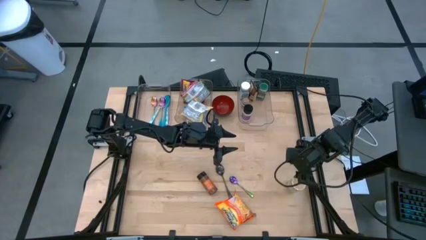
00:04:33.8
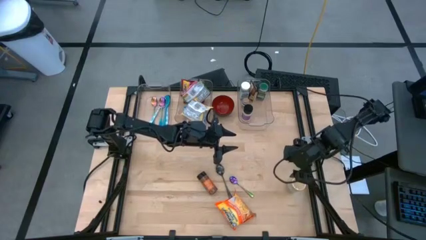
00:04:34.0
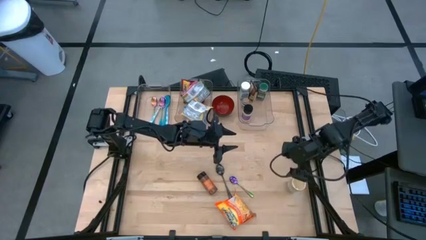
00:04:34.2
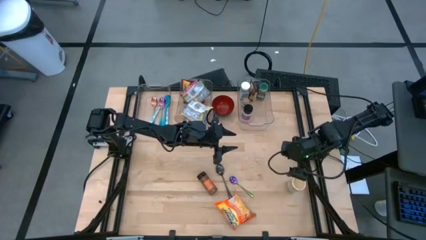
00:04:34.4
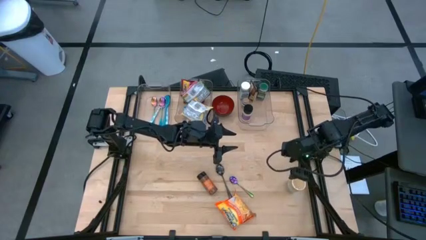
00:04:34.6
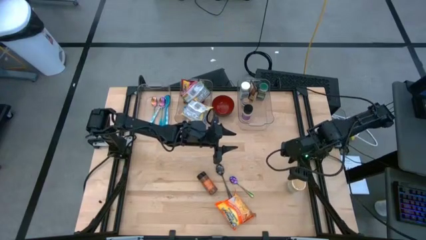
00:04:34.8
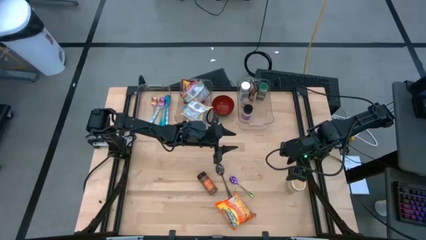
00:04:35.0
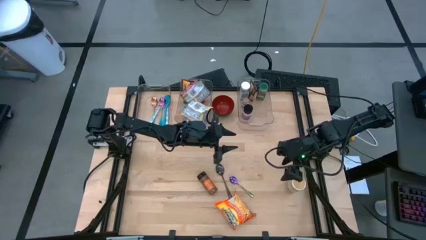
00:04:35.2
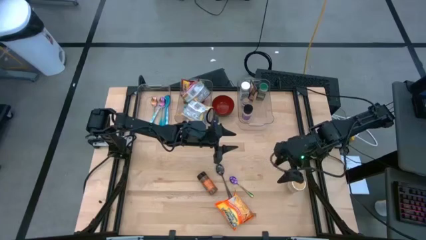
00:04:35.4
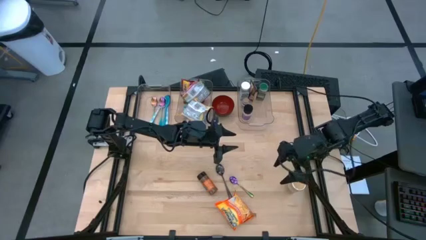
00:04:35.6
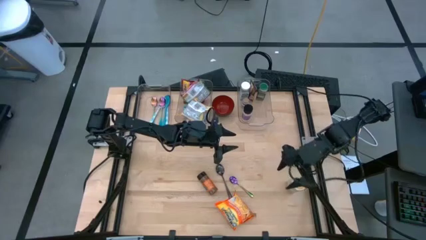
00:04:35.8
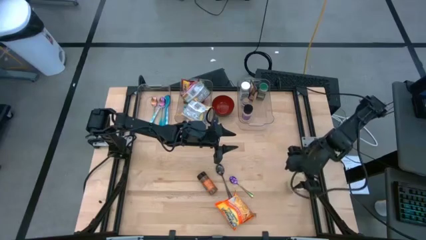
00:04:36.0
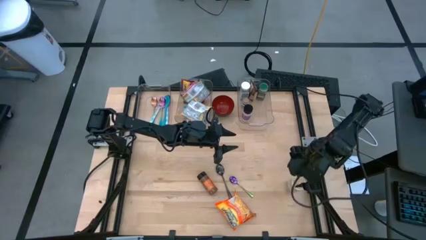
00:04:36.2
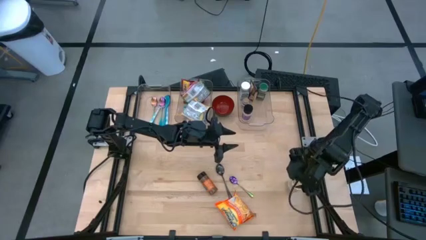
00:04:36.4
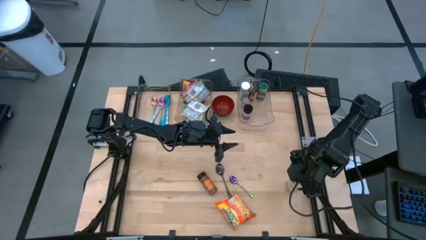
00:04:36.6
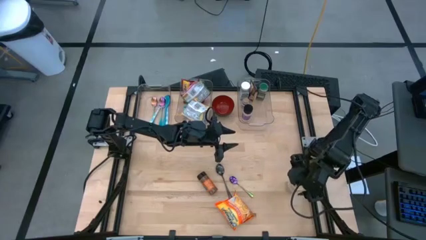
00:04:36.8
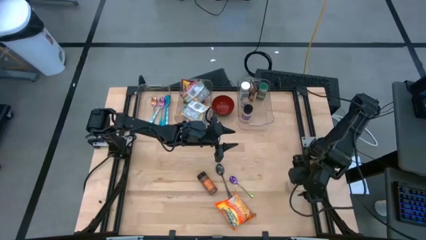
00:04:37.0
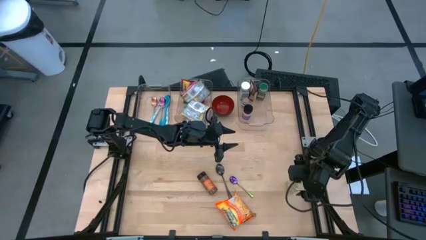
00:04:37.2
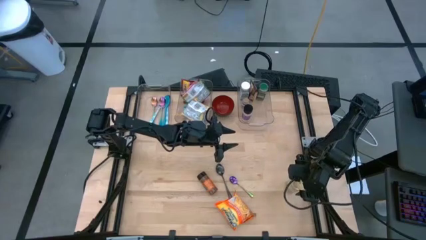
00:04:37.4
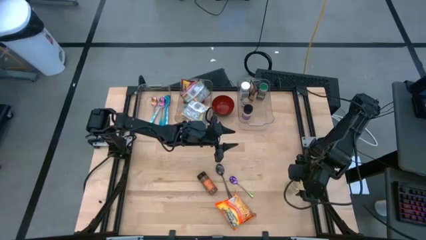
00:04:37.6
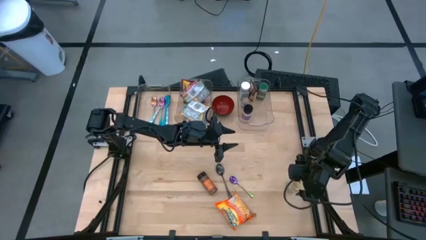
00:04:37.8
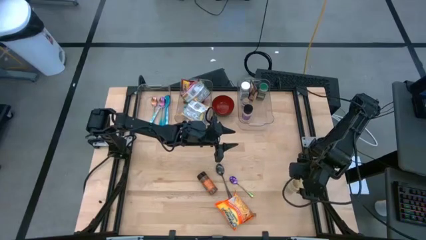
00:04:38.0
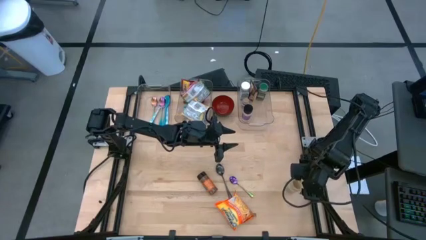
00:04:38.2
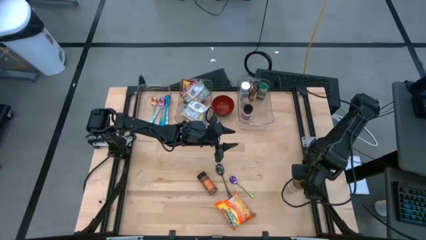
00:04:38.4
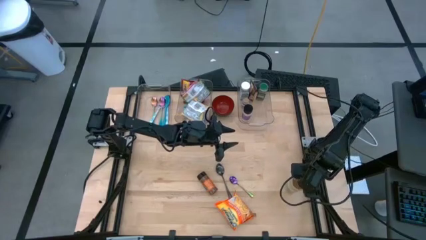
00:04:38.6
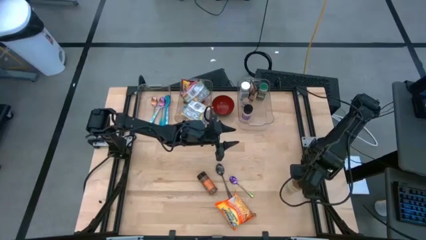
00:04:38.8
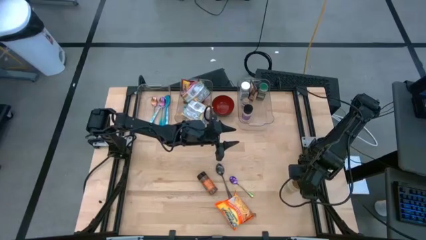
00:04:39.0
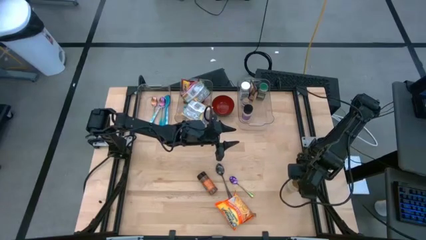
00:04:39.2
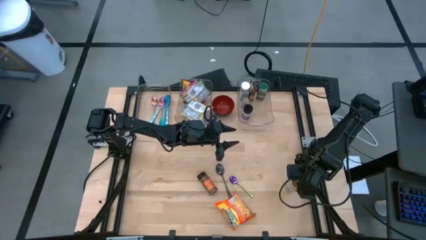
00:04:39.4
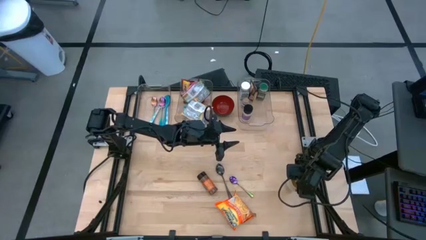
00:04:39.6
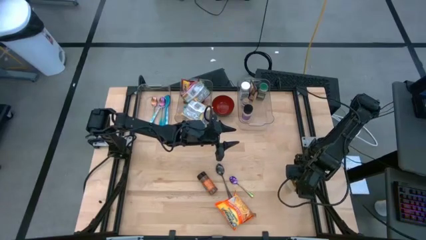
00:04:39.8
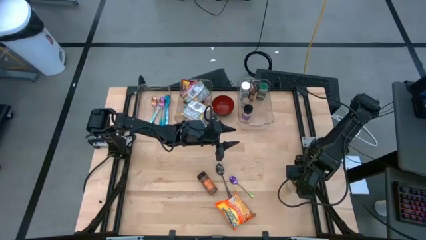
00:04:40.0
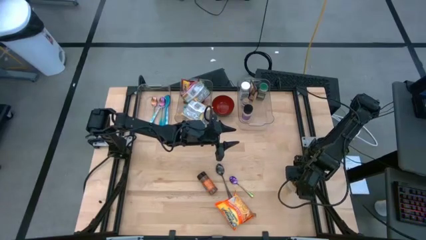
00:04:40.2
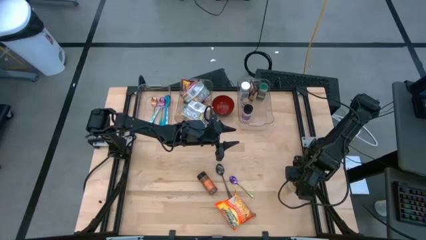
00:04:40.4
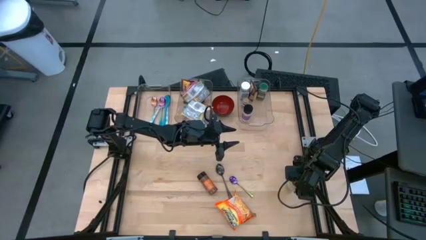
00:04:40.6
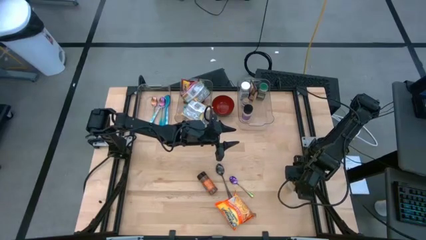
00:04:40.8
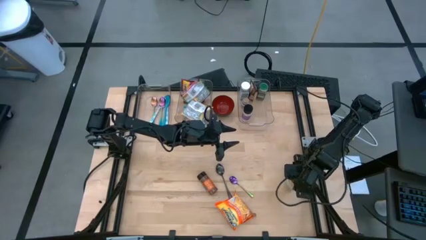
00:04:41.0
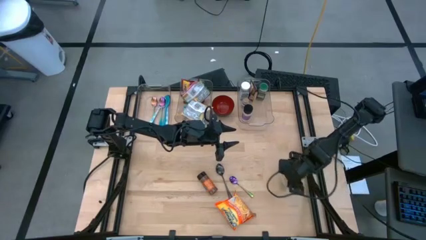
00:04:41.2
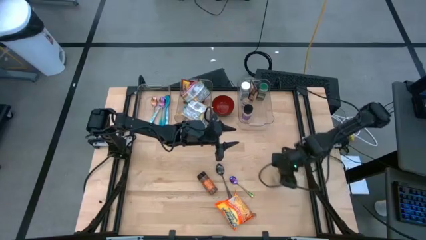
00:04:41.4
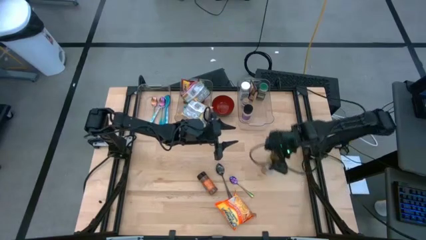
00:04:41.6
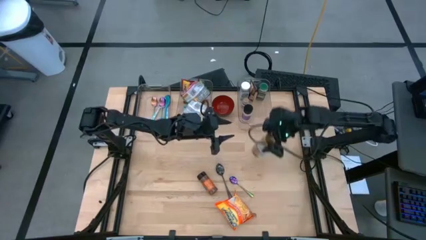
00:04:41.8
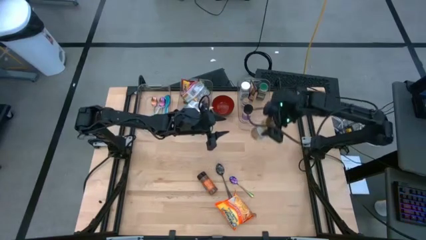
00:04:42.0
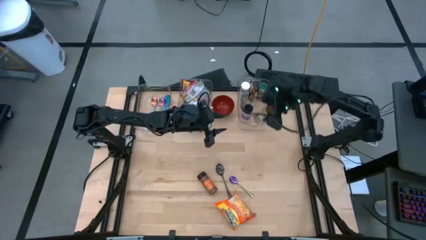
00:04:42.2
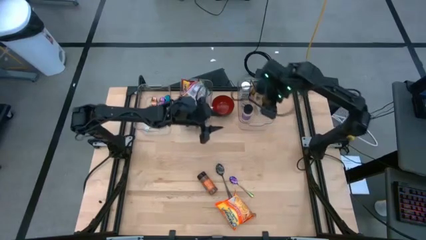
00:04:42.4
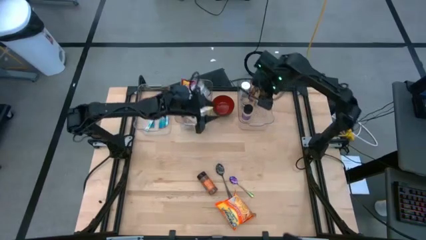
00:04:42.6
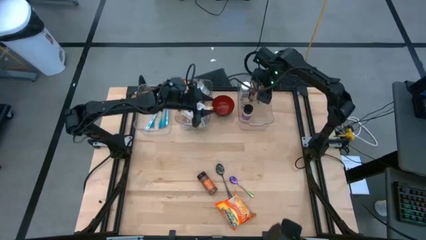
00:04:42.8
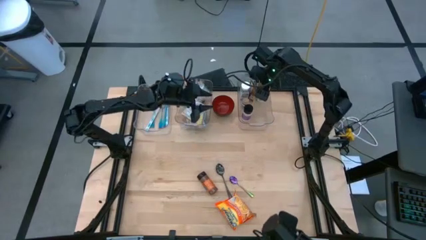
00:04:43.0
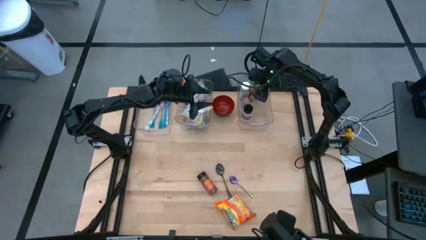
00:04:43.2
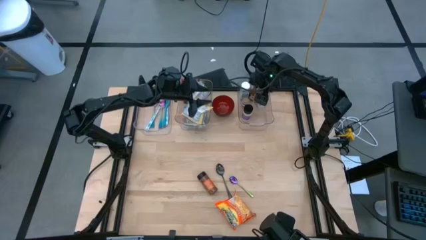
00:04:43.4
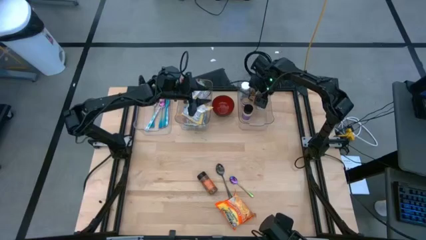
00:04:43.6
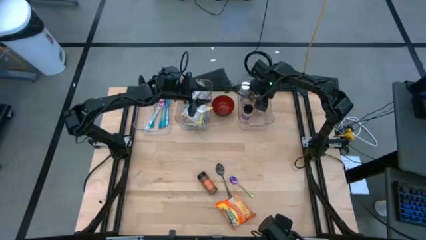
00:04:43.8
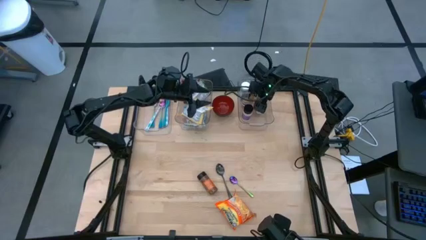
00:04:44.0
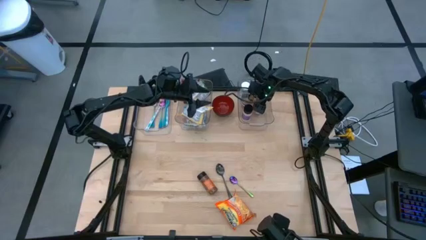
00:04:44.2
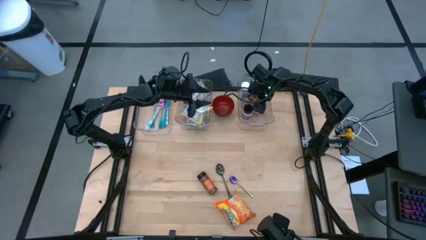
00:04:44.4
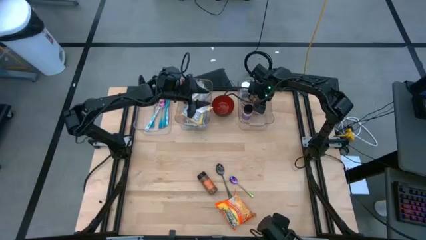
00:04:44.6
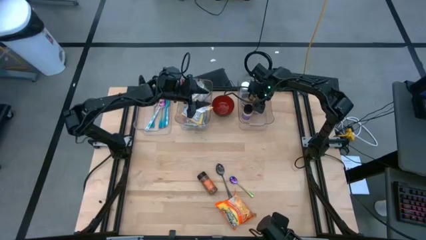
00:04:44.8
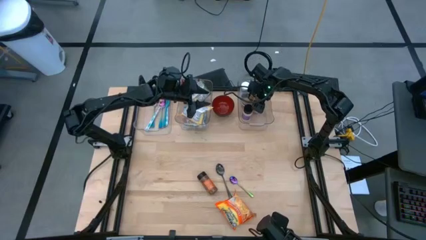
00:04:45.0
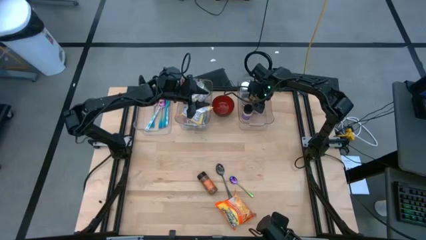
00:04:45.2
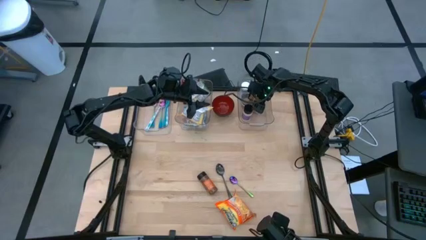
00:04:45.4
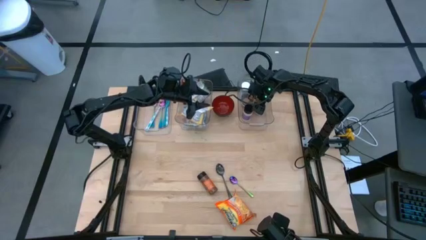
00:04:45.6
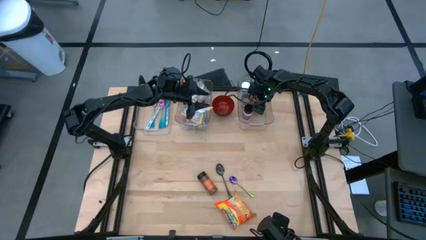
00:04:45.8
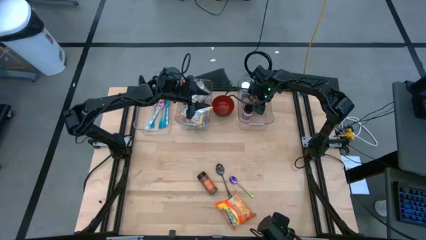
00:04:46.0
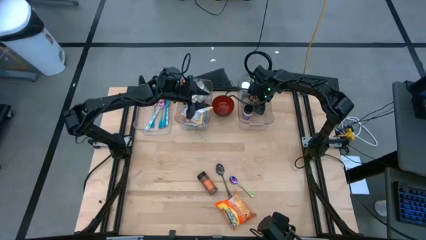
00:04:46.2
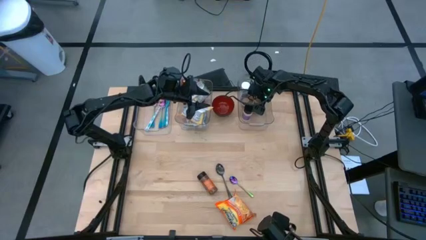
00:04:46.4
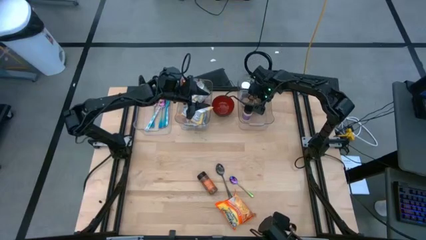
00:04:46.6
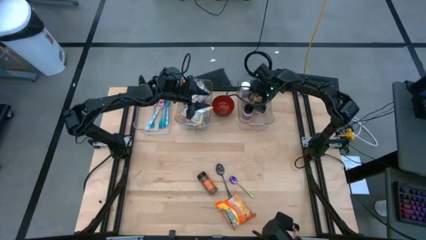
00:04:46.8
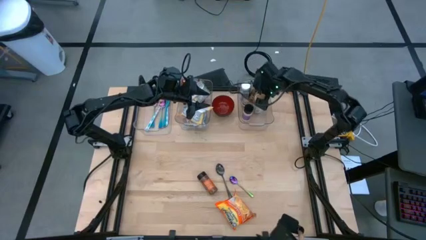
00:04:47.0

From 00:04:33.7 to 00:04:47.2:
Task: Pick & Place Food Item
Put the gold seasoning bottle into the right transparent bin
